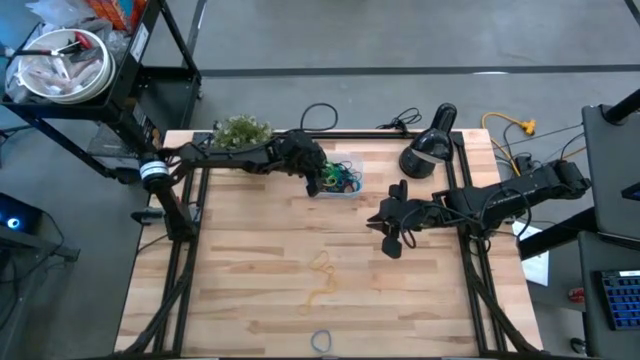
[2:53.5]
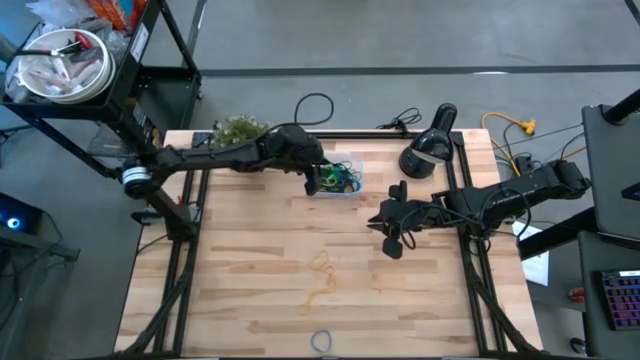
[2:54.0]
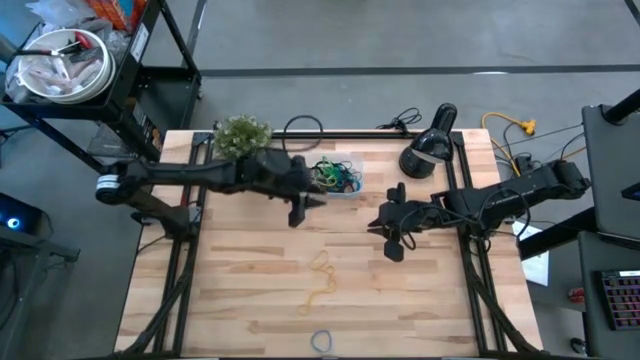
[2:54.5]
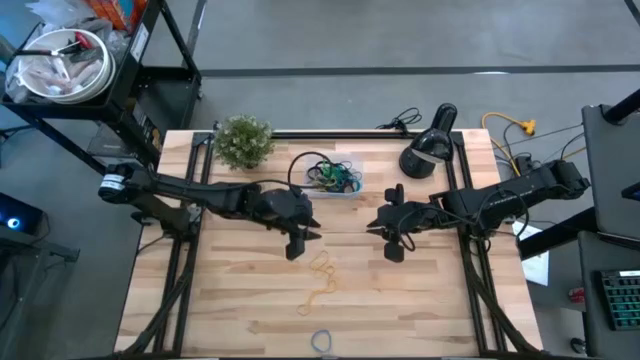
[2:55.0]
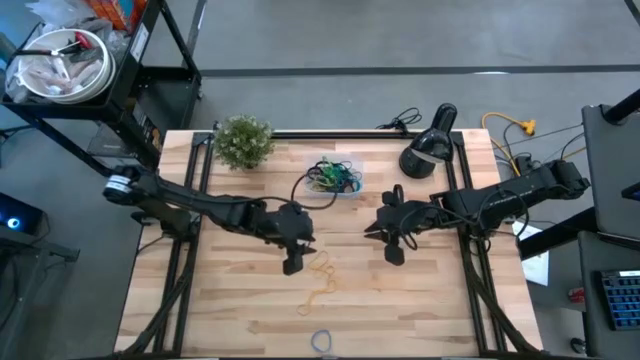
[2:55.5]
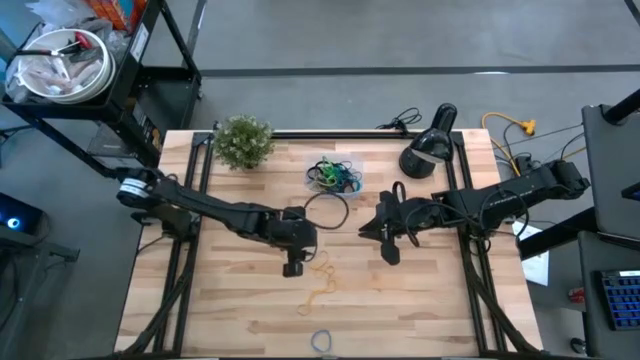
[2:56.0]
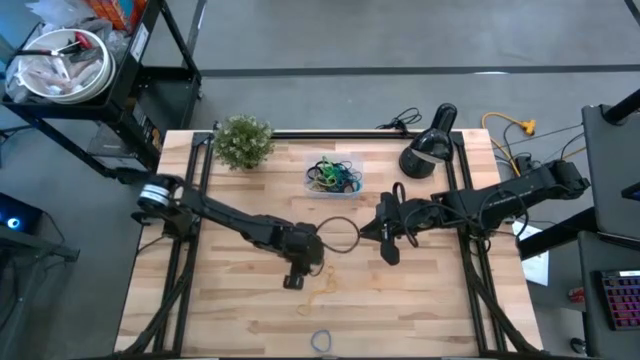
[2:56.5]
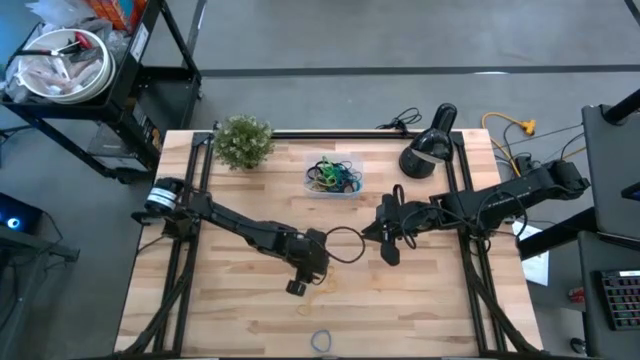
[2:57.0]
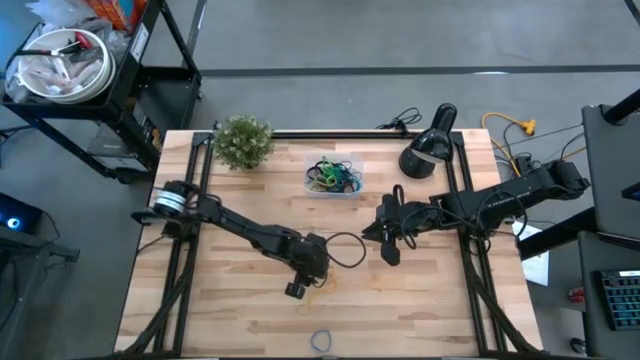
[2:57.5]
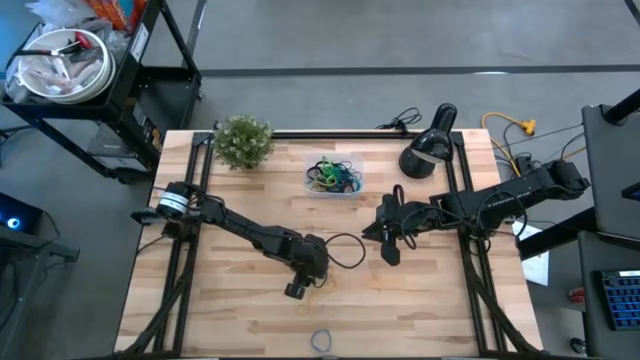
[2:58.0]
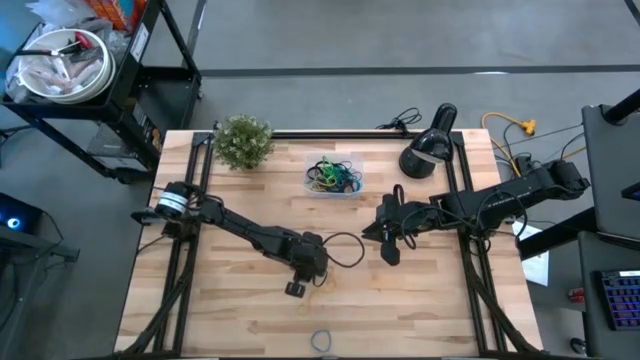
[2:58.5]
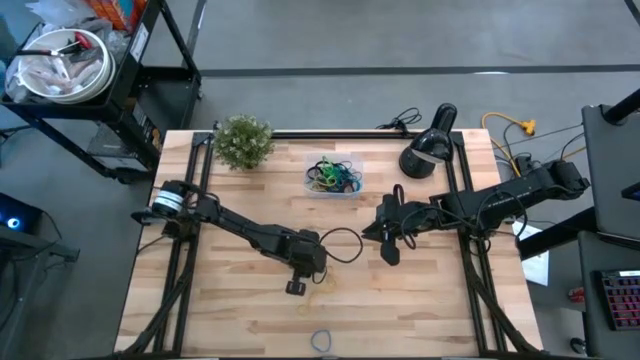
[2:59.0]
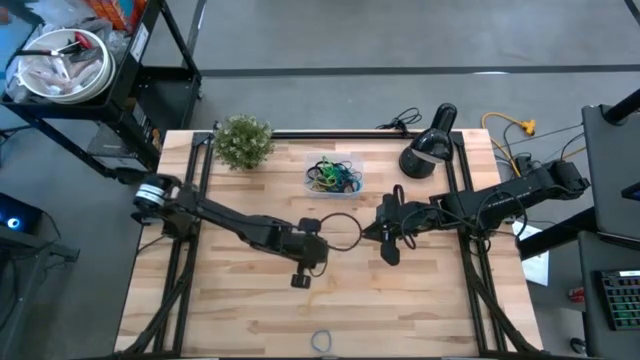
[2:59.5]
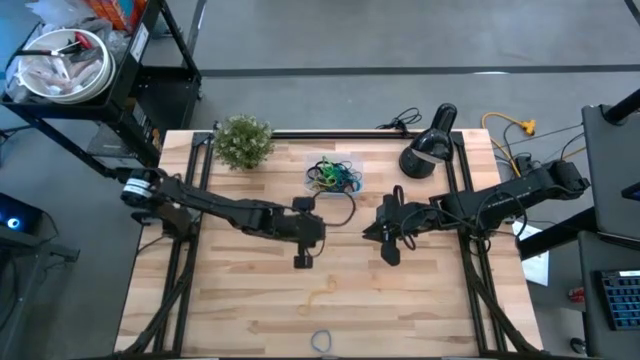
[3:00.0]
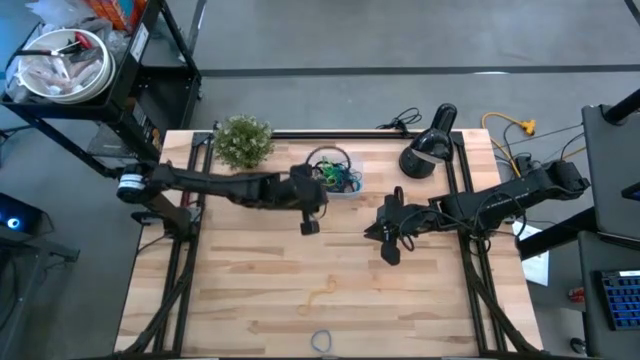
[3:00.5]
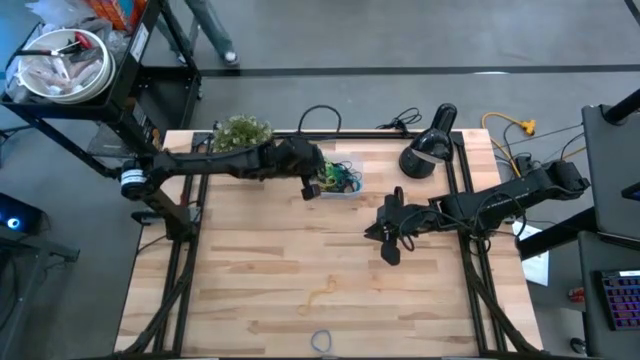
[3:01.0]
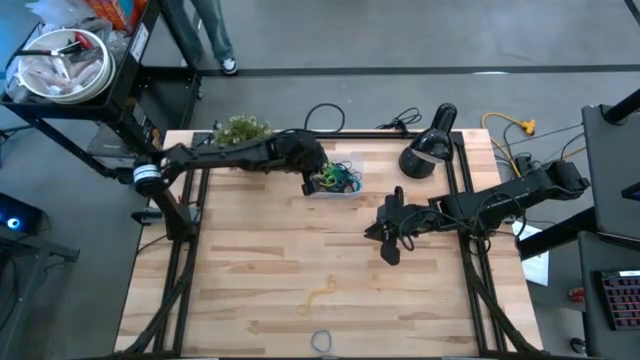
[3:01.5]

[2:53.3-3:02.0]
Task: Pick and place rubber bands into bin
Put the yellow rubberband into the transparent bin

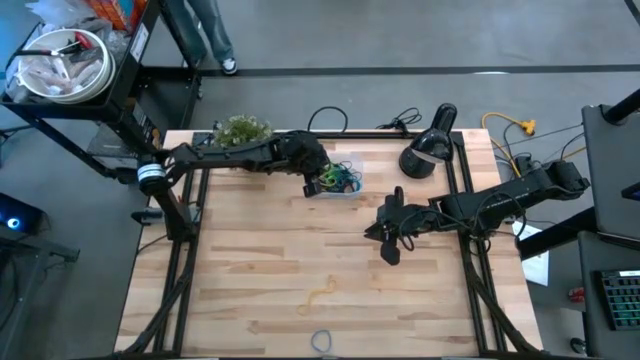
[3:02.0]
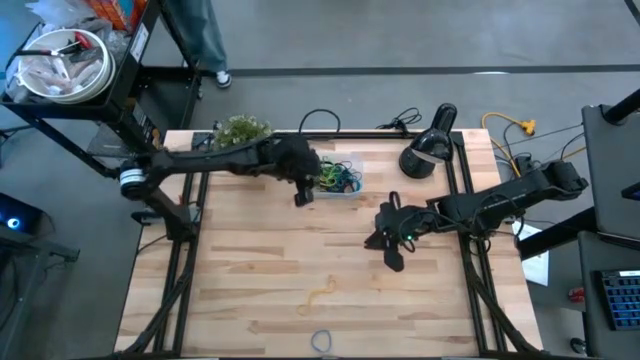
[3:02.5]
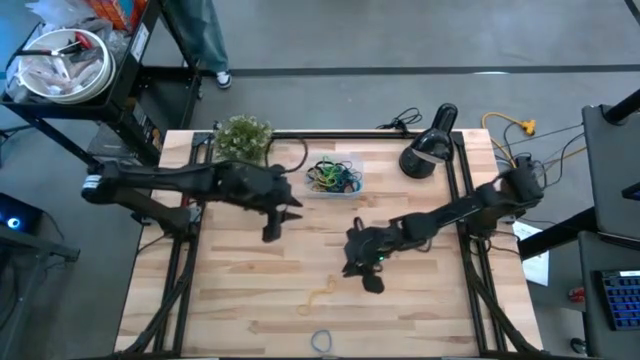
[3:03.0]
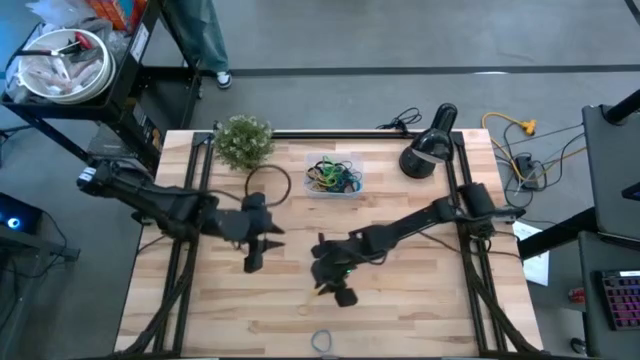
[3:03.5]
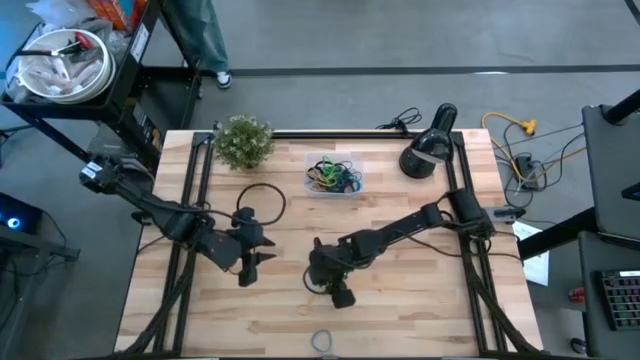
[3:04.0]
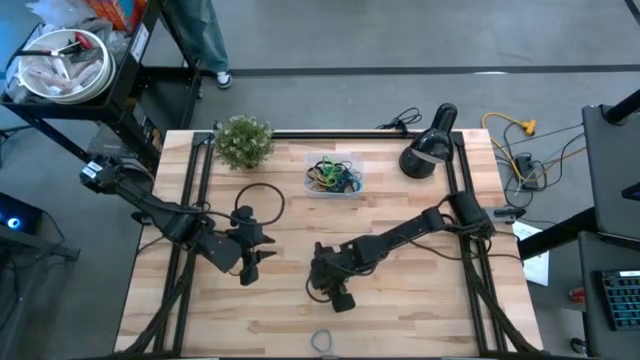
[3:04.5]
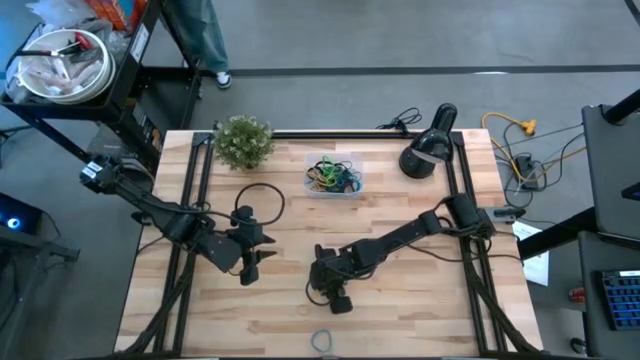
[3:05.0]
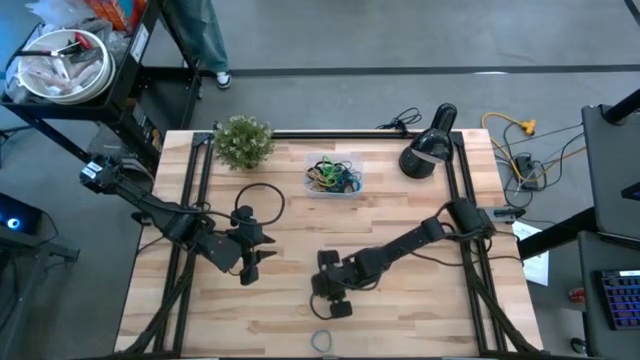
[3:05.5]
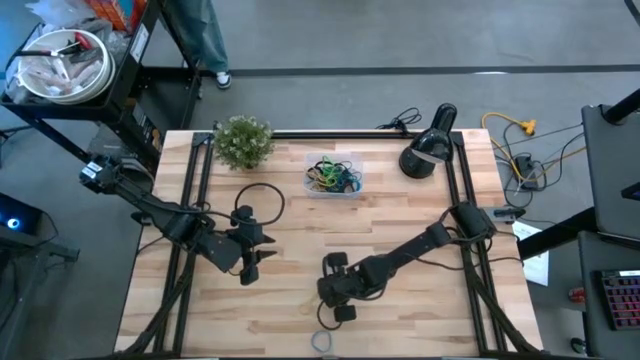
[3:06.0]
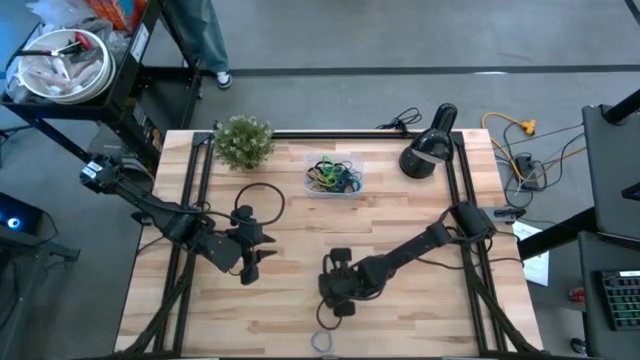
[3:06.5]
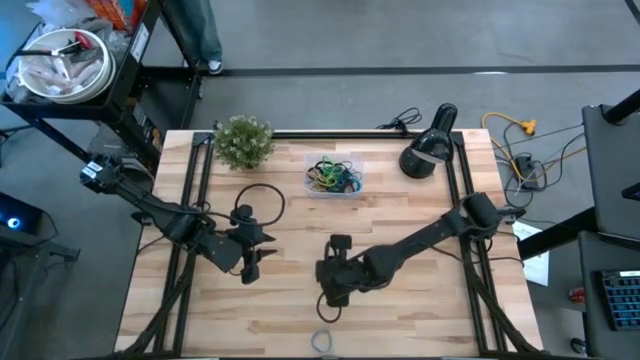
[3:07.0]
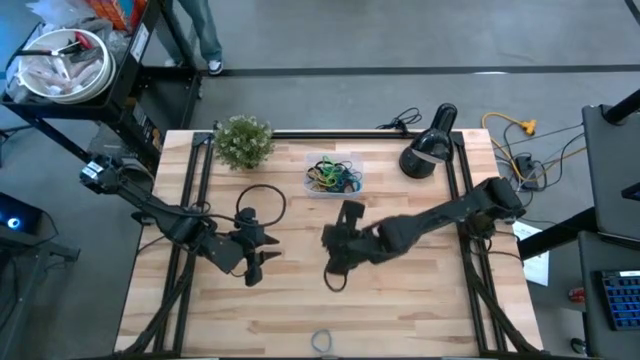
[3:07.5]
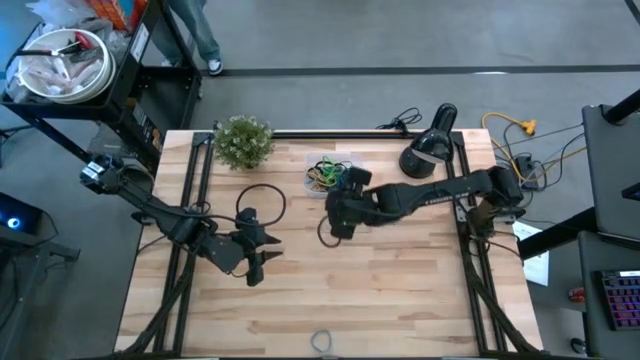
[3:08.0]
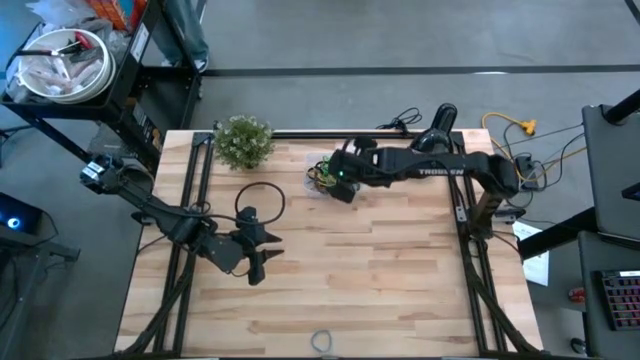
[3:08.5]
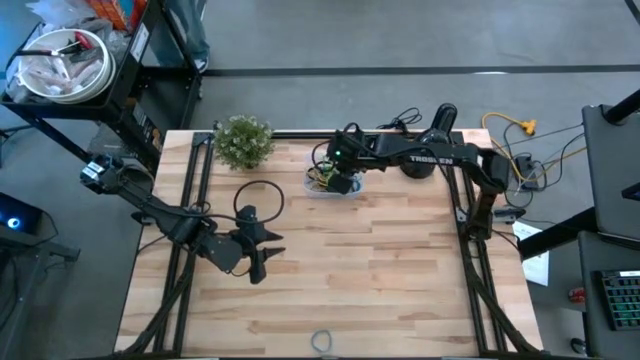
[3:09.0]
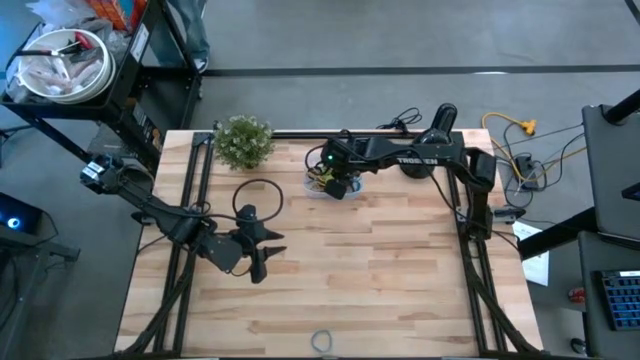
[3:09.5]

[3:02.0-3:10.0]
Put the yellow rubberband into the transparent bin

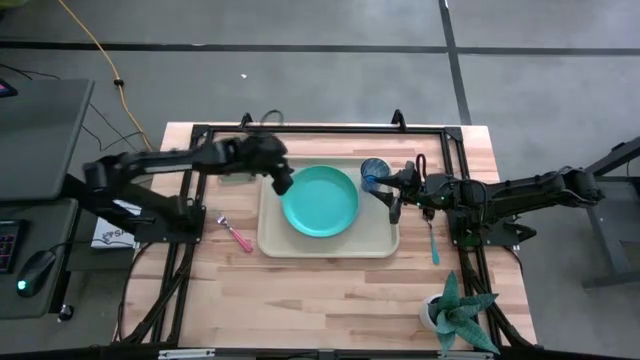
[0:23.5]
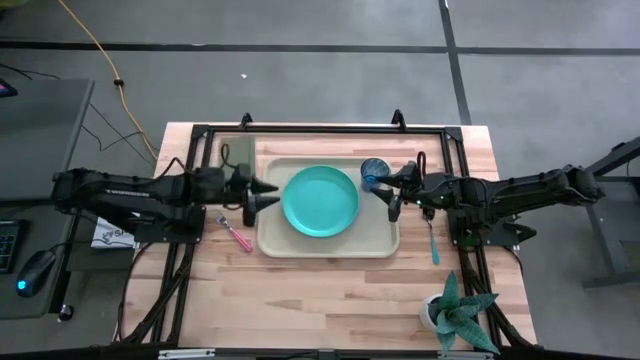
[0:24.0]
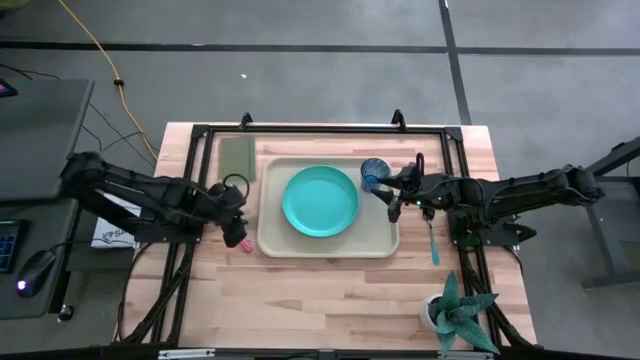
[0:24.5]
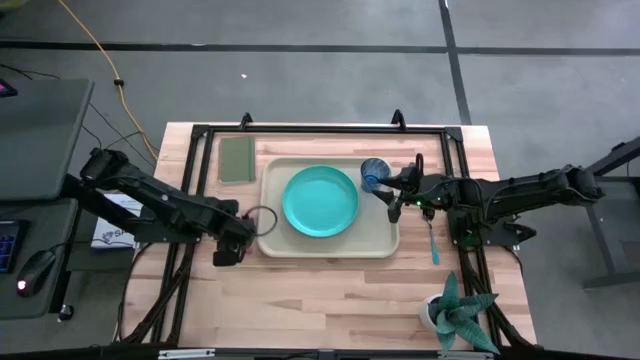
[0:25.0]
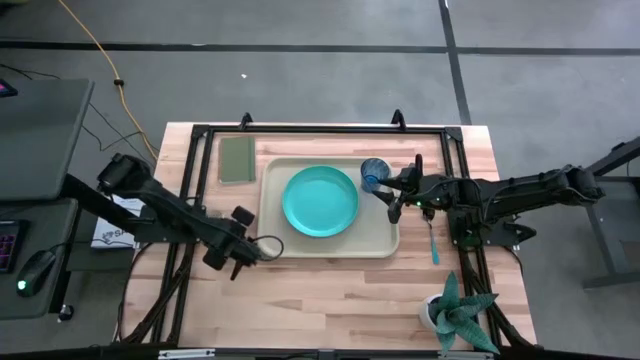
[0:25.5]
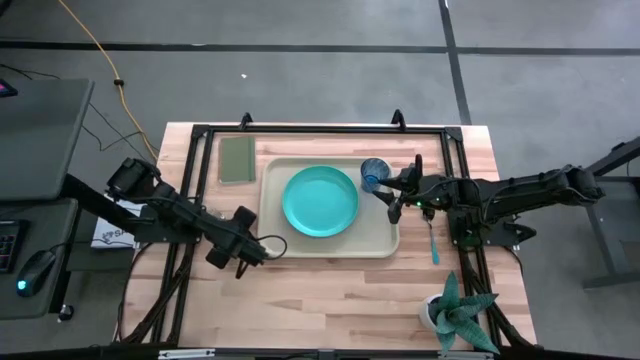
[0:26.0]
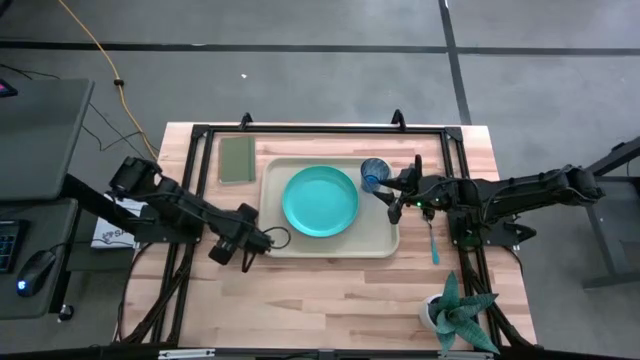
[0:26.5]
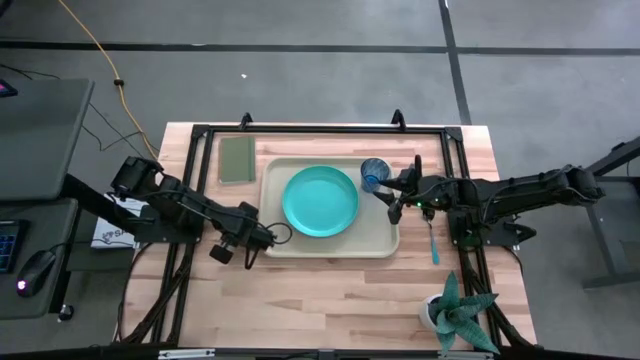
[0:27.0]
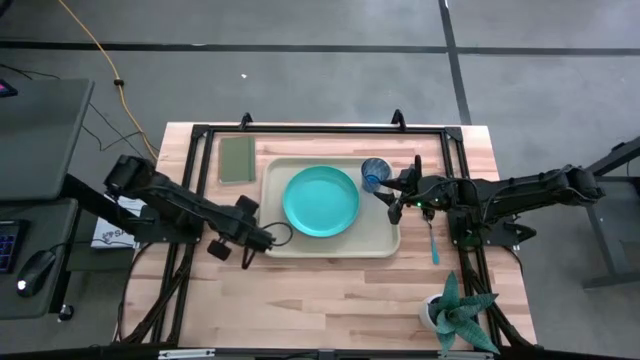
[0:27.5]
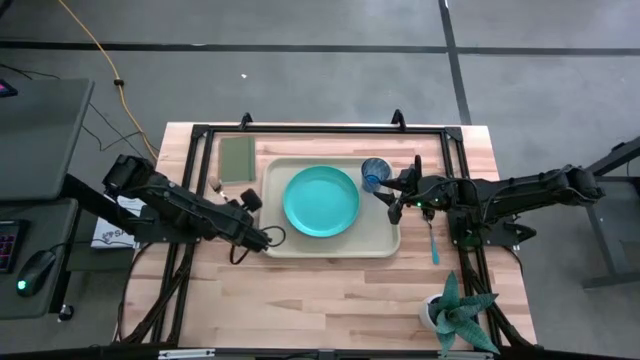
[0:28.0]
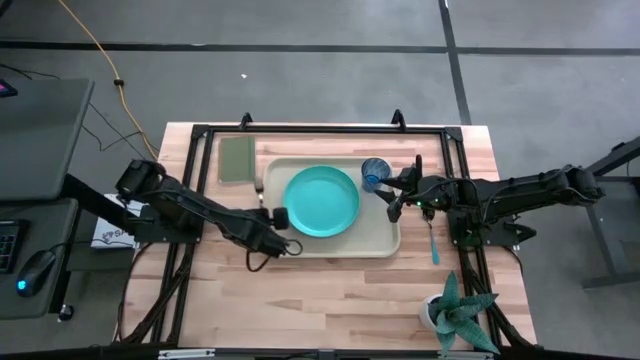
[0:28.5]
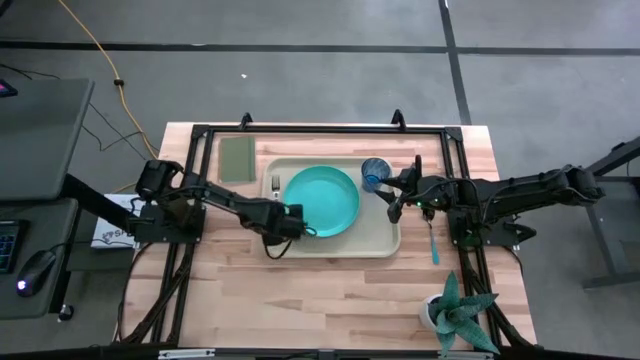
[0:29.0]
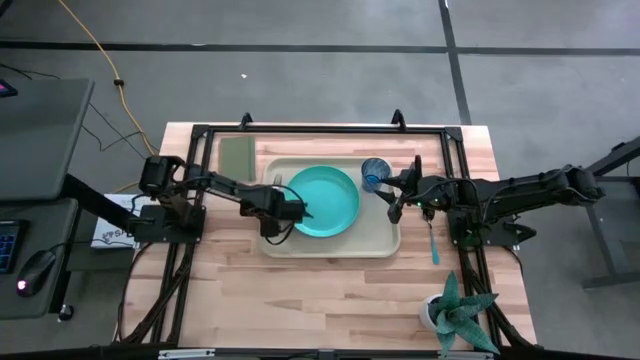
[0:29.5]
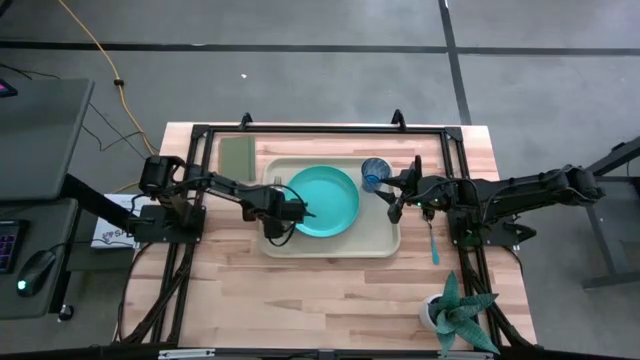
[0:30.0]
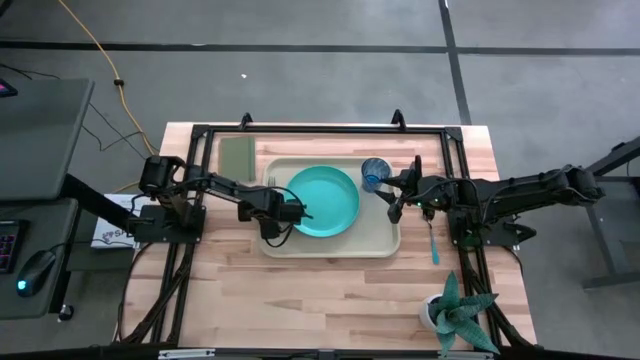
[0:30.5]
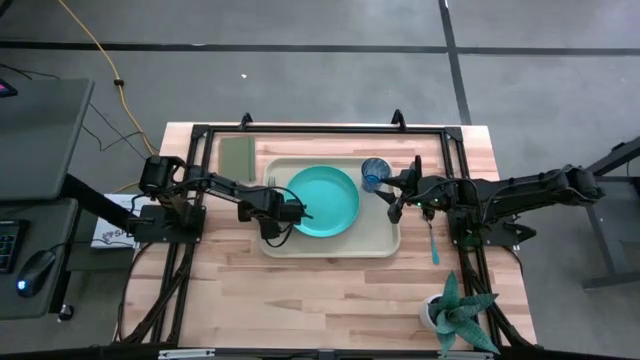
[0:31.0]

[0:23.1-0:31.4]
Task: Pick and place plate/cup/fork/spoon on tray
Put the pink fork on the light brown serving tray at the left of the light blue plate
